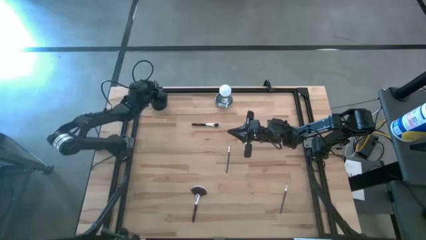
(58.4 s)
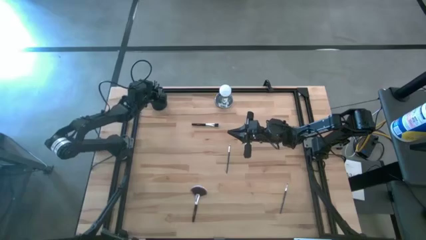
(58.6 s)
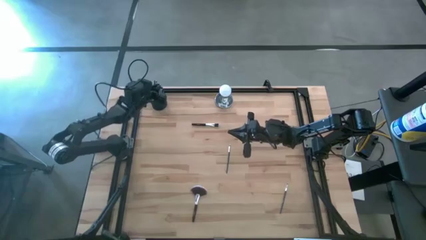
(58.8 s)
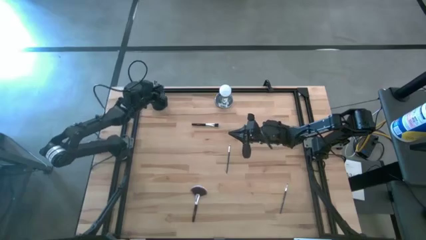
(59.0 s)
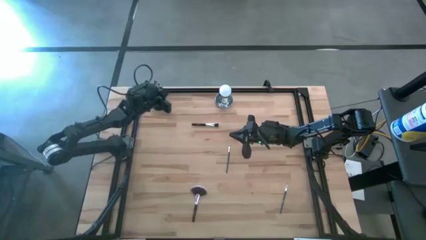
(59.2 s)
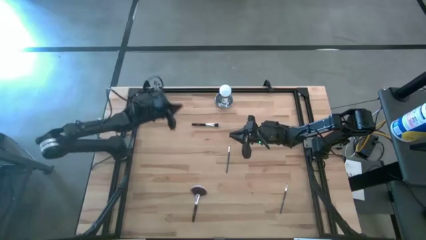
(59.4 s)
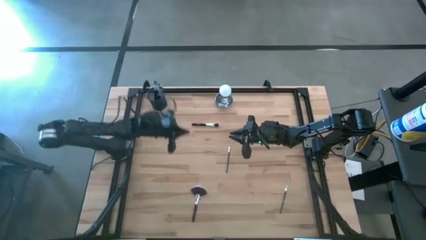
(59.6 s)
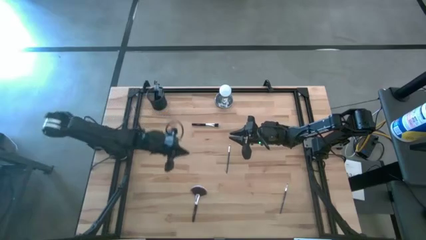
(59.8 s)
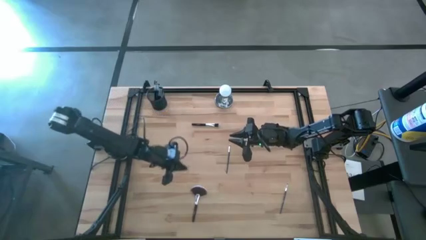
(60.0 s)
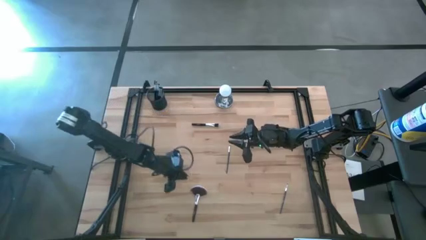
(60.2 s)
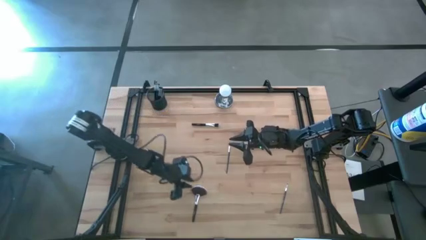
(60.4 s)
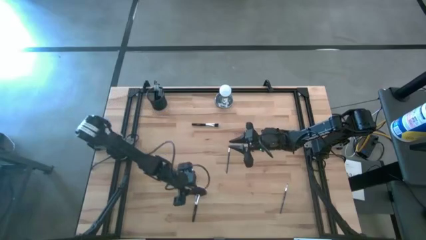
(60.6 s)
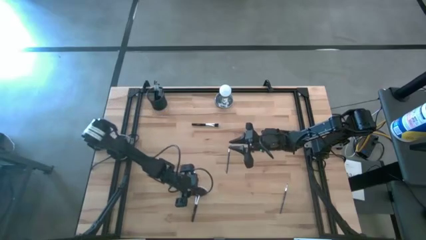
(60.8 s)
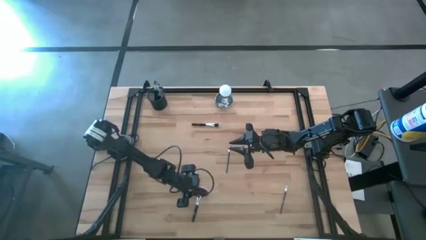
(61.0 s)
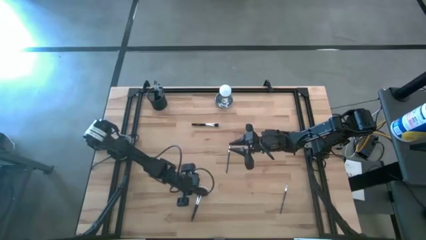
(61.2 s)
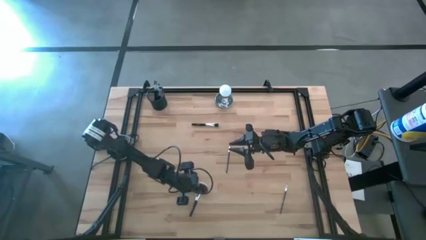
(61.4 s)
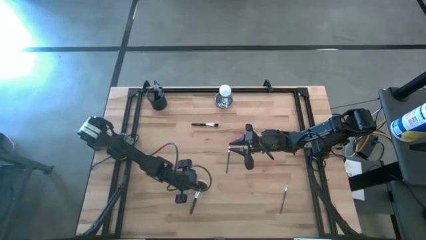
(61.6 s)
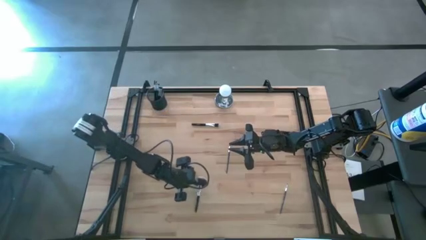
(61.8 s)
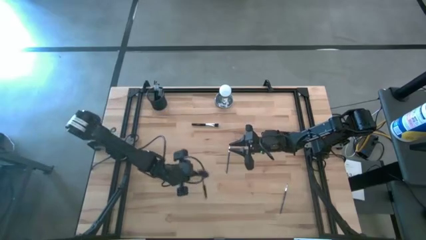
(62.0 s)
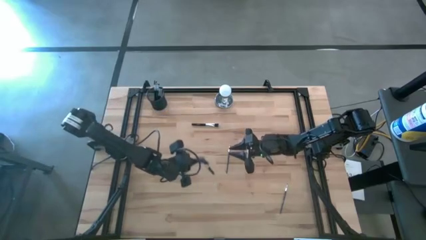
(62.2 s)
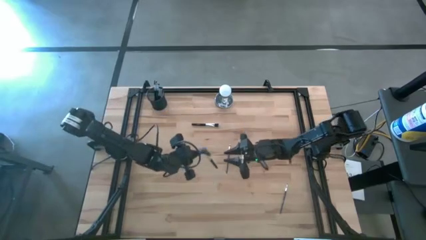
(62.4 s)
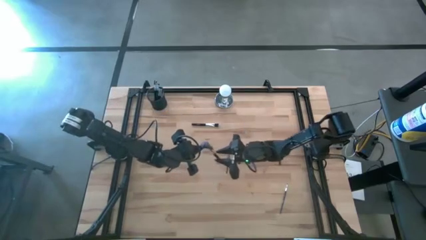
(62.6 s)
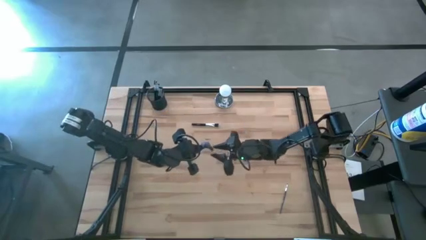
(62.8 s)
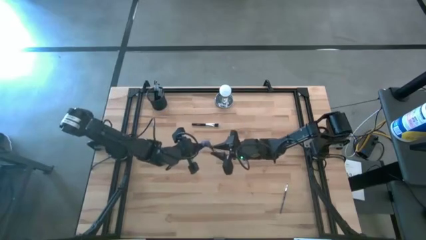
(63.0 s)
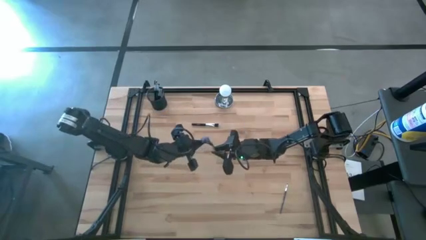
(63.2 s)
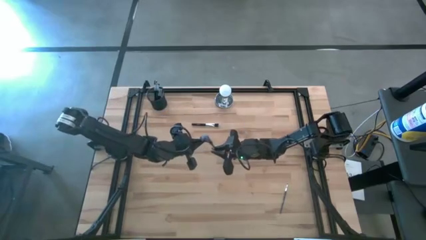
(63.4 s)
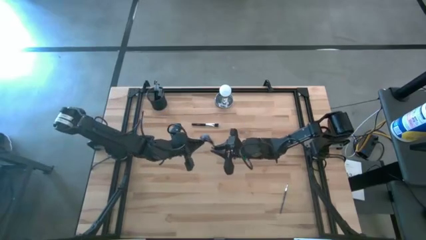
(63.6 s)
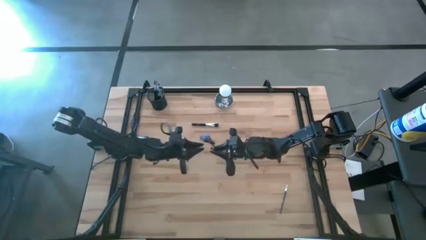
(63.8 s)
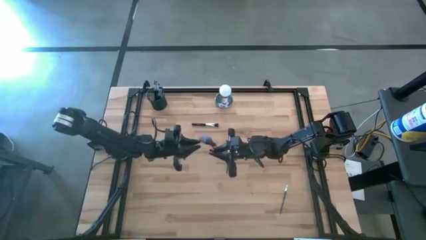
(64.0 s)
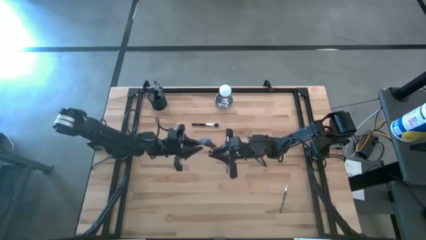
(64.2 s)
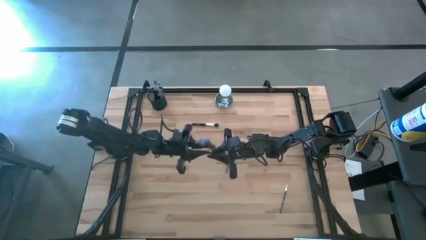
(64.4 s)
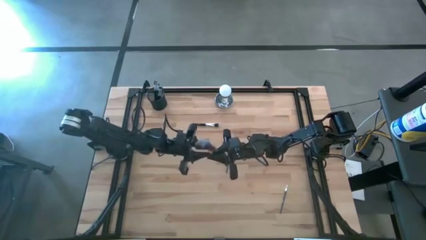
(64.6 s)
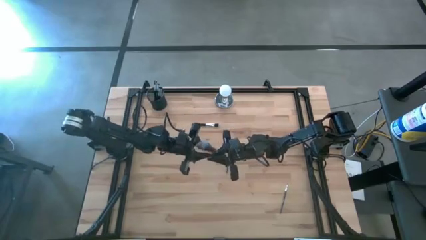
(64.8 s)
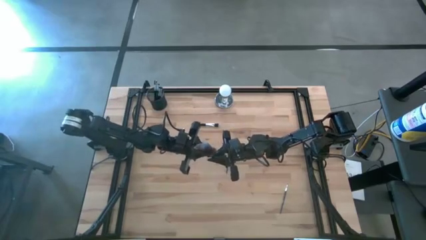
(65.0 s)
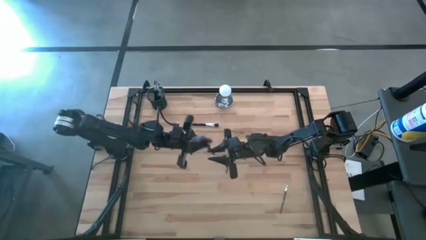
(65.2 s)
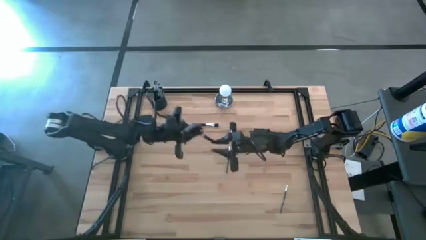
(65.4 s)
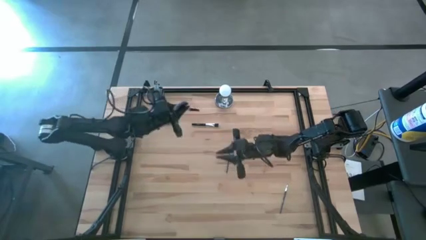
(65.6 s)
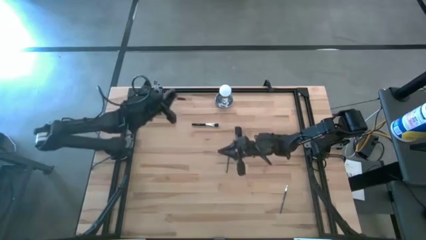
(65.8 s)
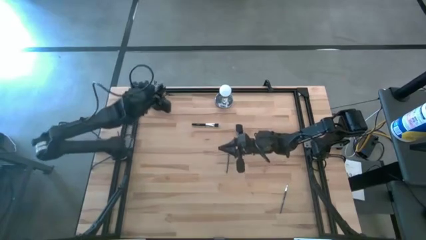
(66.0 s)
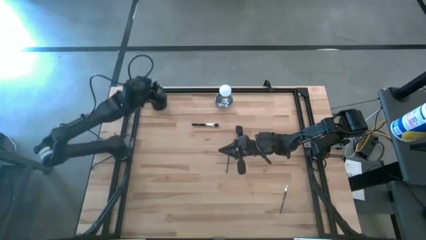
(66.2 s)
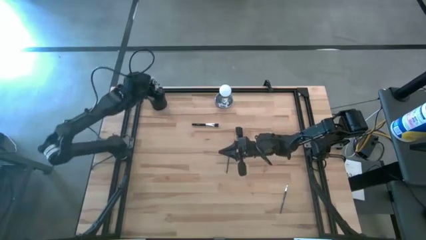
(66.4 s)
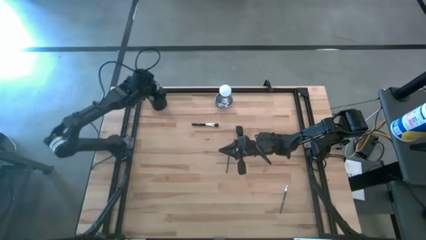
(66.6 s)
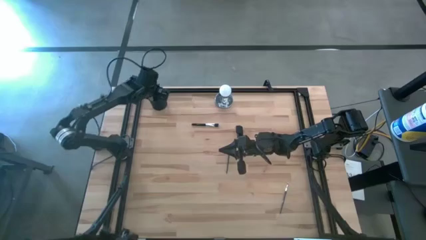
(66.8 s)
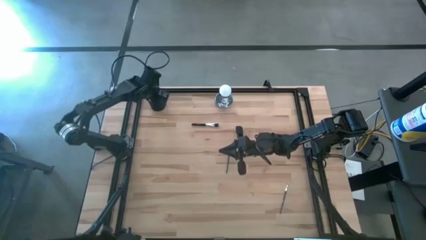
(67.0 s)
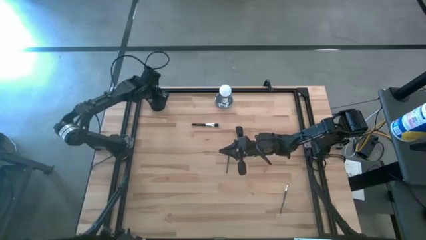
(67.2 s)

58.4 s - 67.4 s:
Task: Put items in baskets/containers
Put the black highlighter brush into the black brush holder

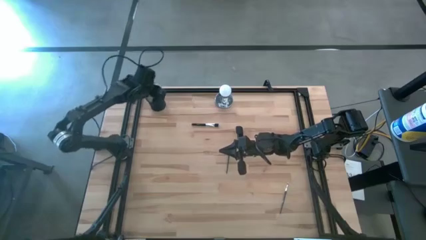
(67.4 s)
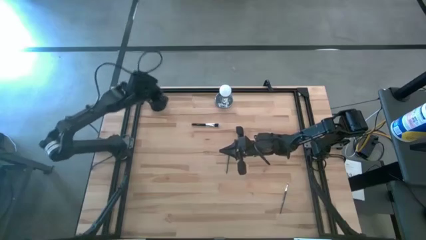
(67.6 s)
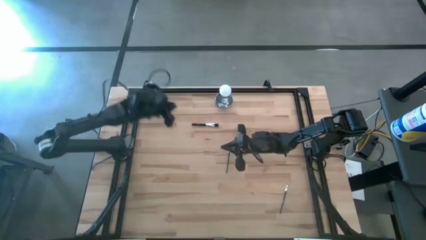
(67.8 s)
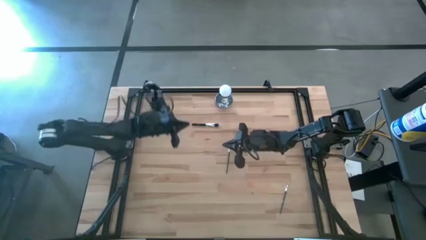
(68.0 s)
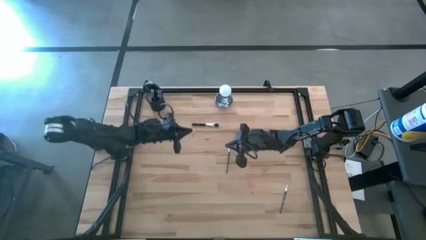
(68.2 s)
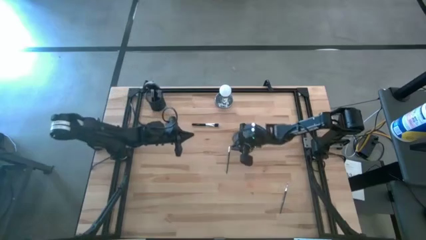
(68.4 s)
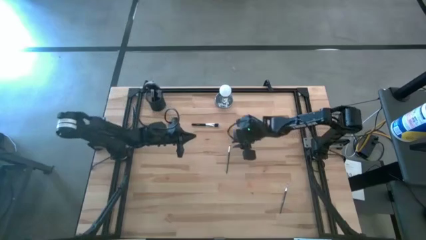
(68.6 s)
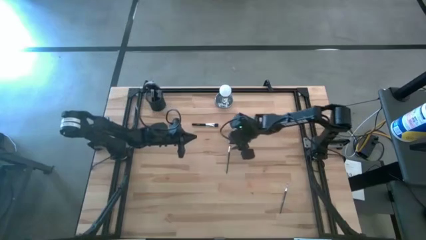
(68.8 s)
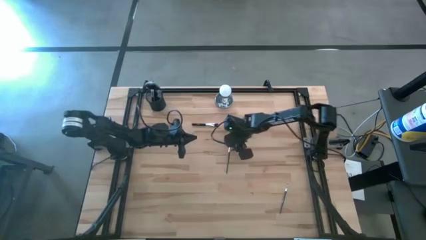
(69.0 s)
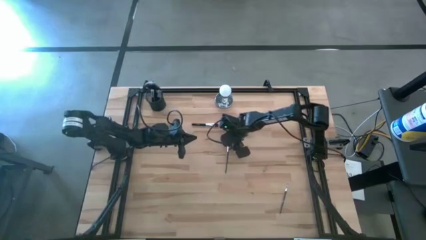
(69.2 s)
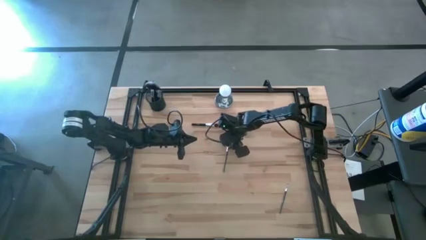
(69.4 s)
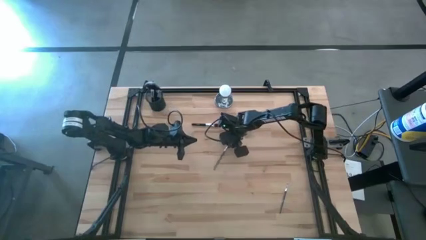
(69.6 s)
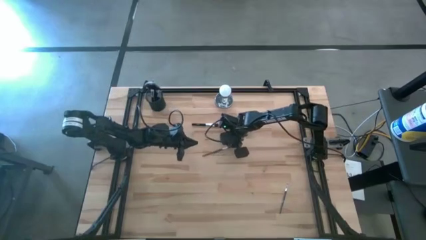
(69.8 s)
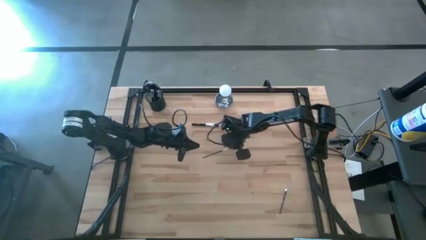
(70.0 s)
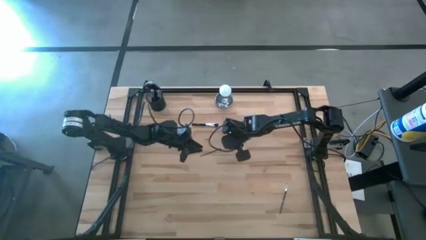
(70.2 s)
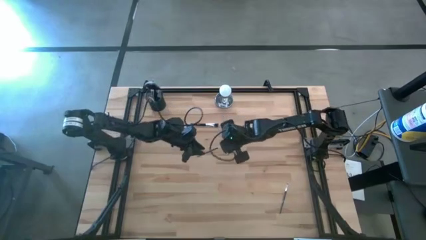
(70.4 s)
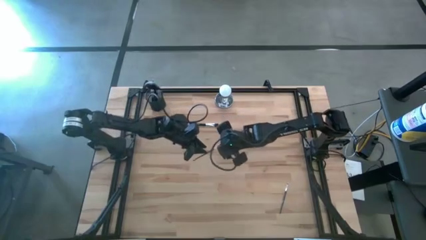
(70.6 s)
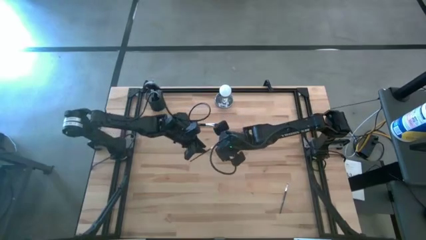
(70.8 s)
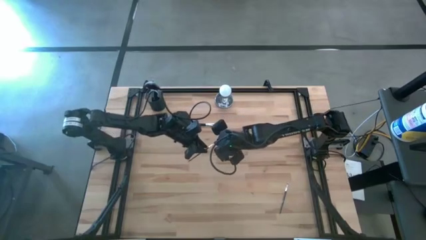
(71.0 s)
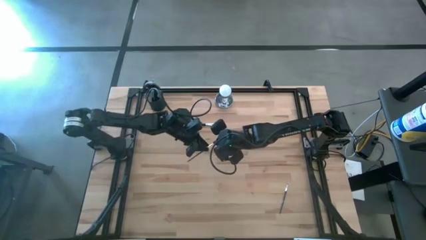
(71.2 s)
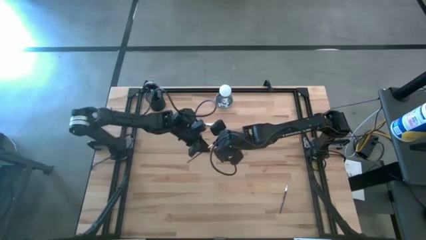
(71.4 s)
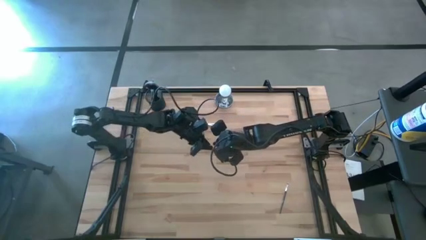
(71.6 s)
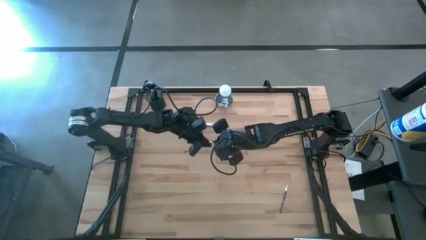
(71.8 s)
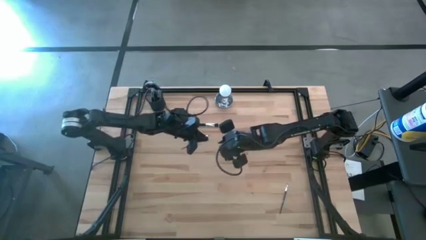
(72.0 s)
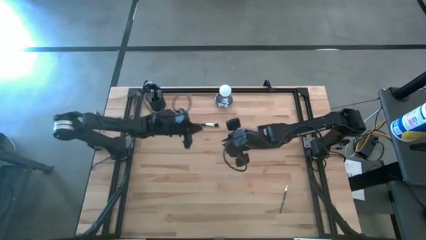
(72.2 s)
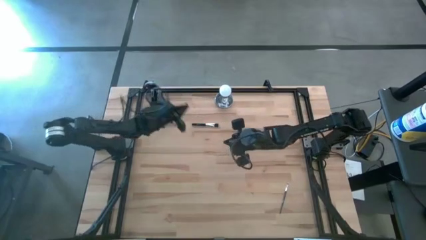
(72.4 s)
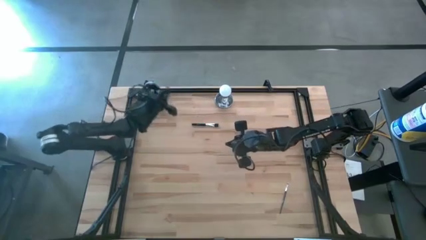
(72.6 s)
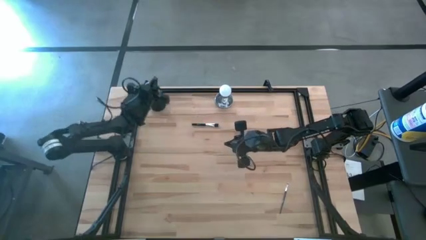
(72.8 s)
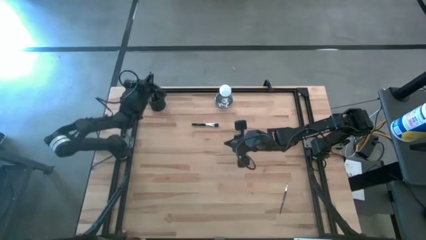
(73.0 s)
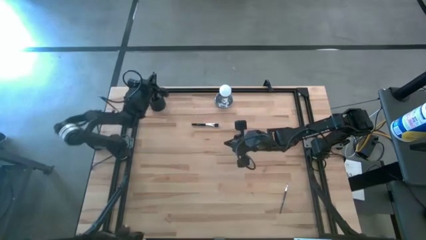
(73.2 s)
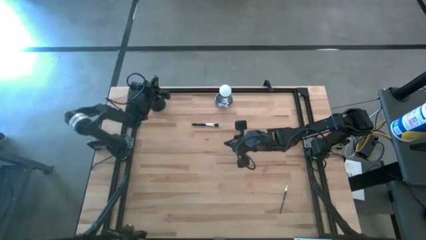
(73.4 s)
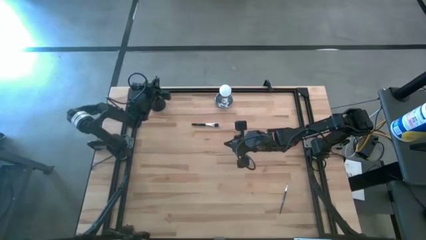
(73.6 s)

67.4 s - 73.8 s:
Put the black eyeshadow brush into the black brush holder

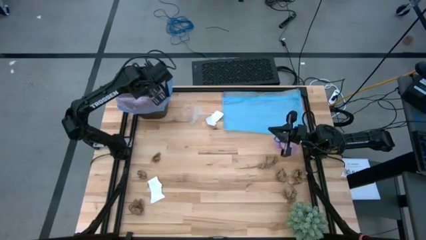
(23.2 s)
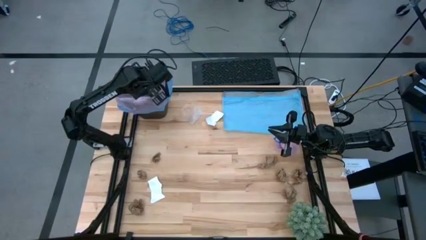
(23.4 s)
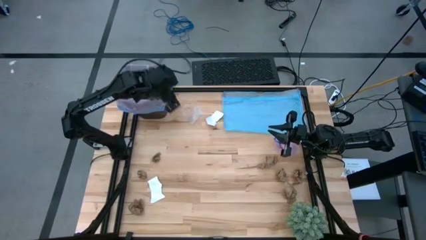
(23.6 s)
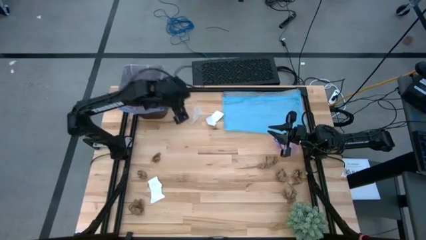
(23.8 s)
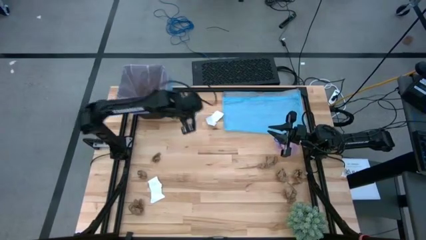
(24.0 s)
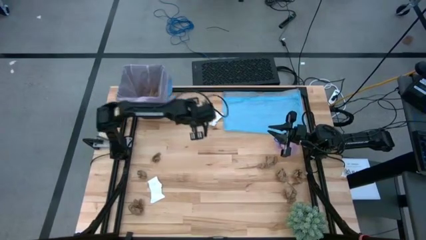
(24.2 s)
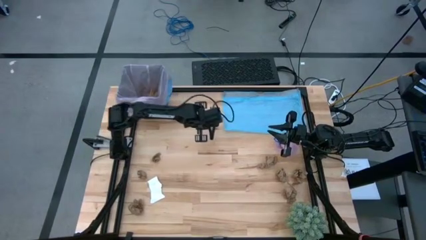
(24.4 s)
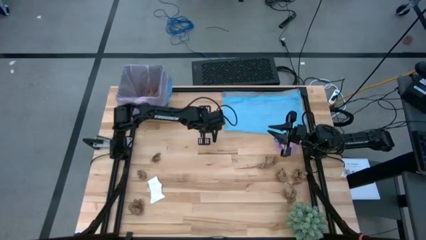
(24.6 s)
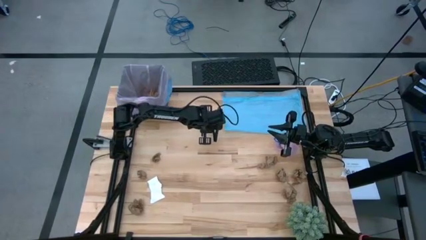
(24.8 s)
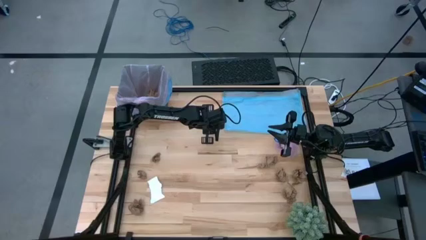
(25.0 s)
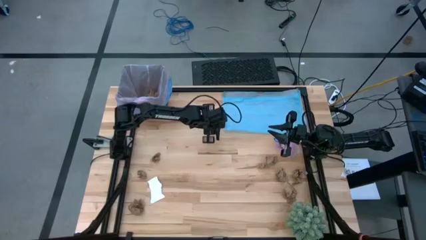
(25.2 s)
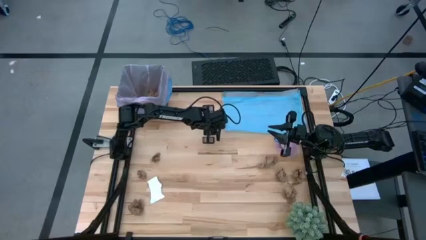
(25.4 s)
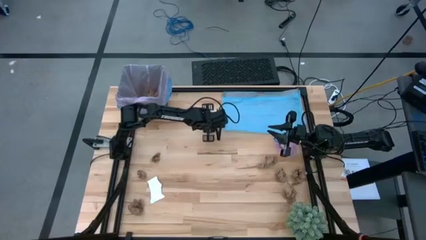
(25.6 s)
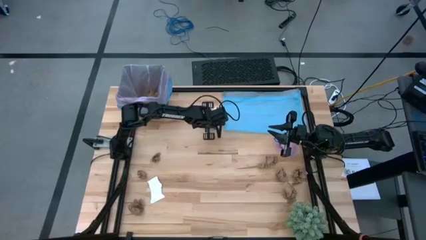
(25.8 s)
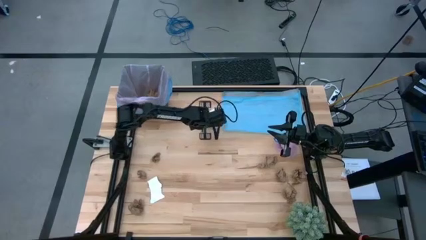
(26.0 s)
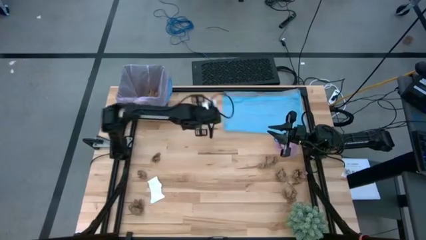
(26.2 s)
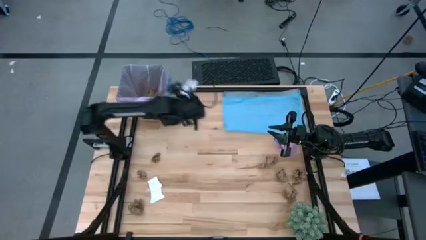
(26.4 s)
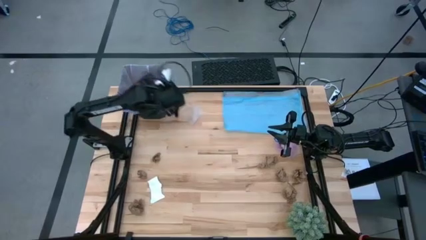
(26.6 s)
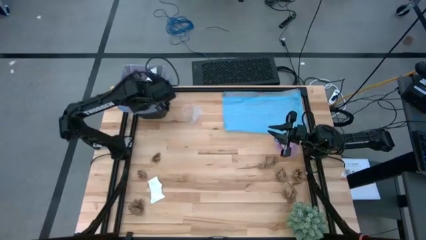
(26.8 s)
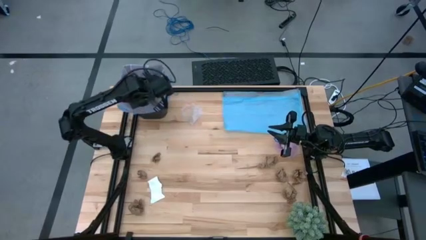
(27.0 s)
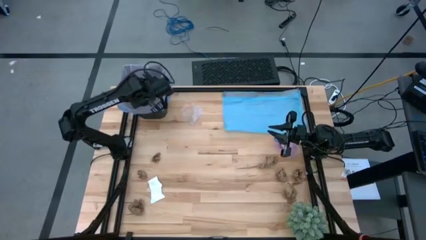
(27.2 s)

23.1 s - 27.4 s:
Task: place trash/remove bag and relplace
Put the white paper into the trash bin
